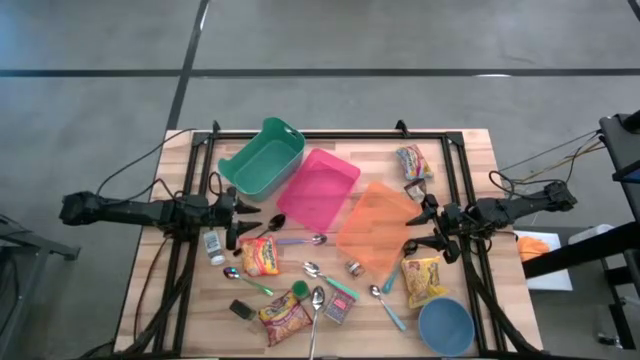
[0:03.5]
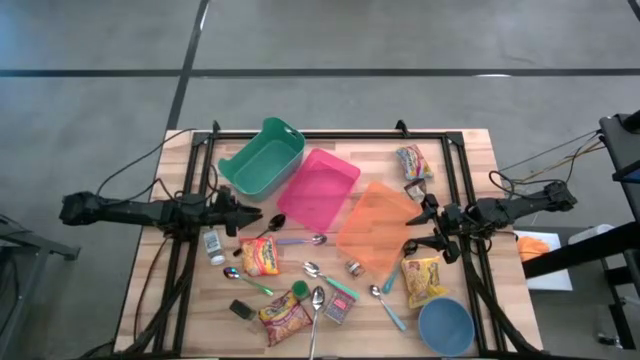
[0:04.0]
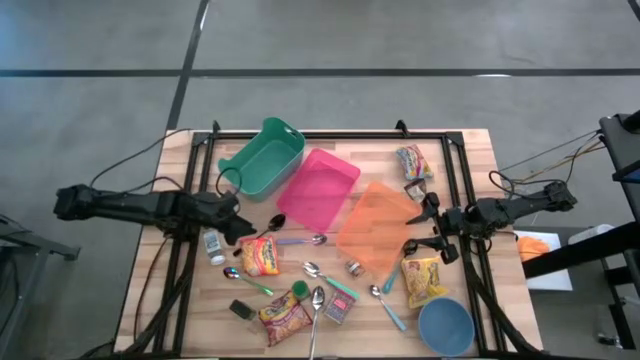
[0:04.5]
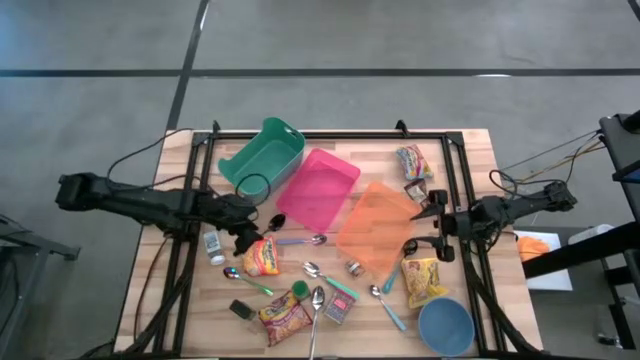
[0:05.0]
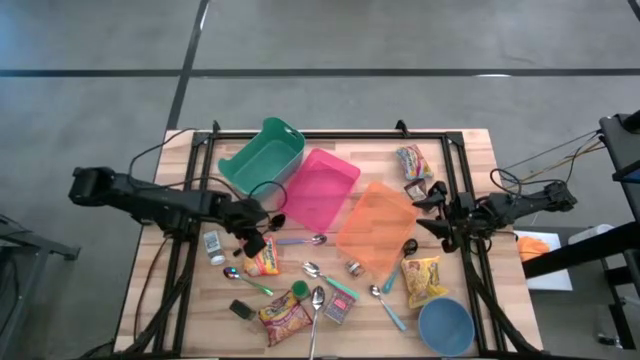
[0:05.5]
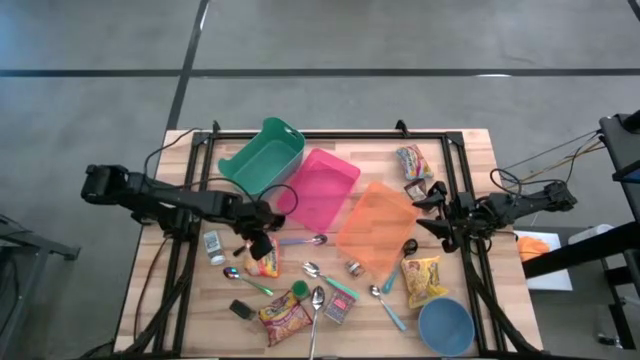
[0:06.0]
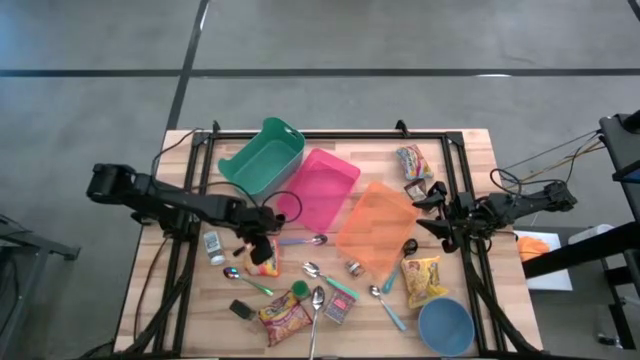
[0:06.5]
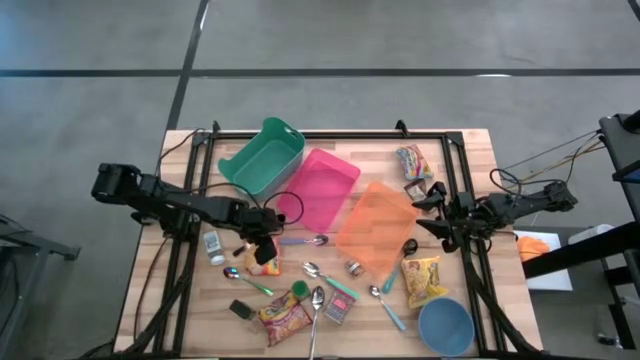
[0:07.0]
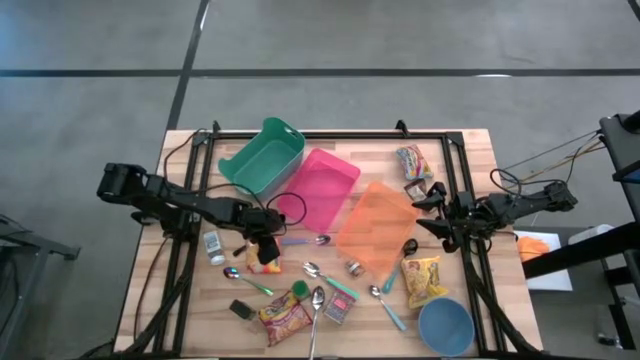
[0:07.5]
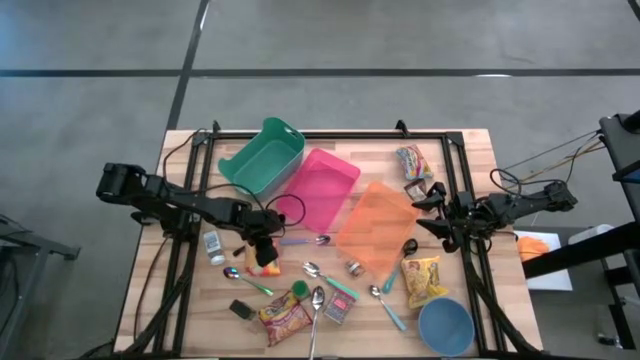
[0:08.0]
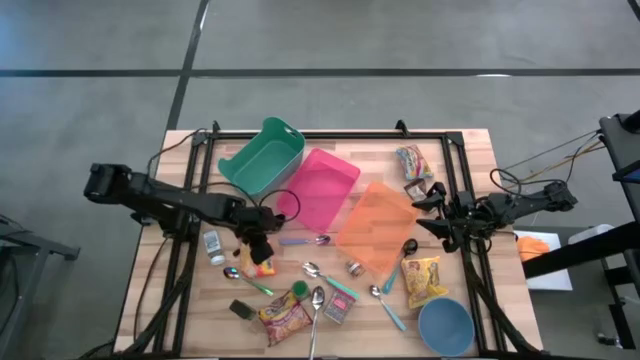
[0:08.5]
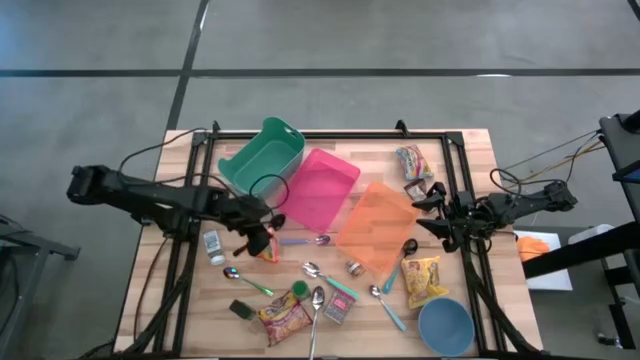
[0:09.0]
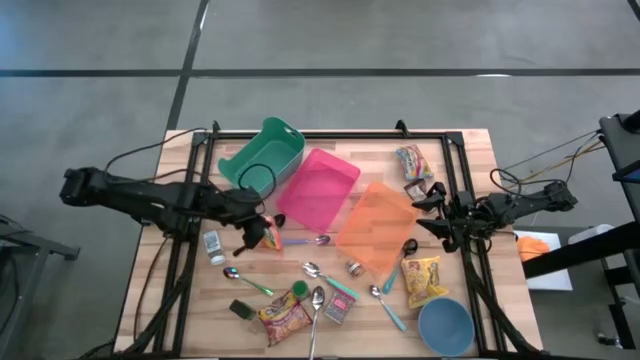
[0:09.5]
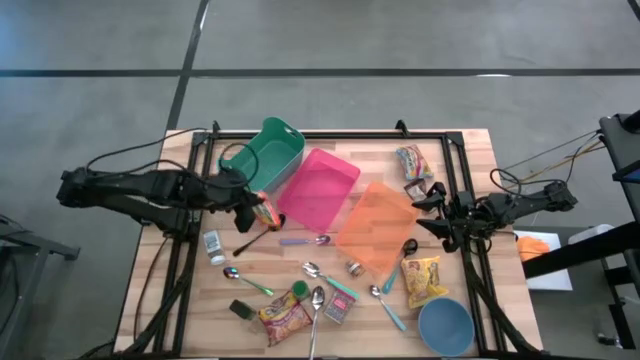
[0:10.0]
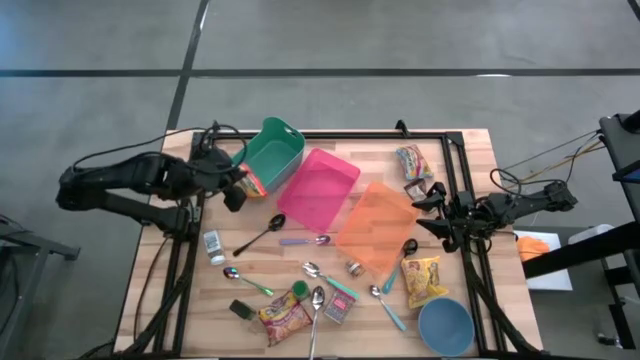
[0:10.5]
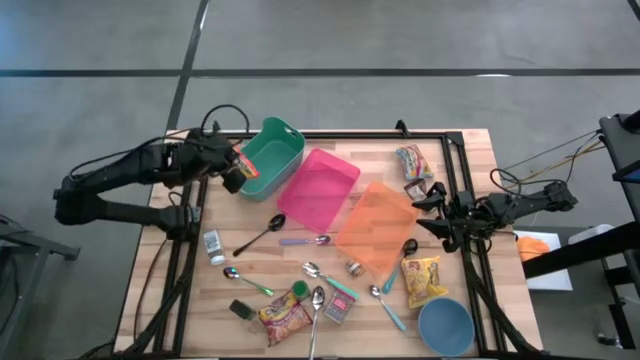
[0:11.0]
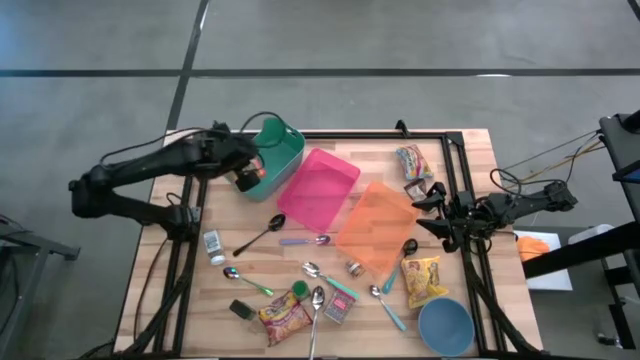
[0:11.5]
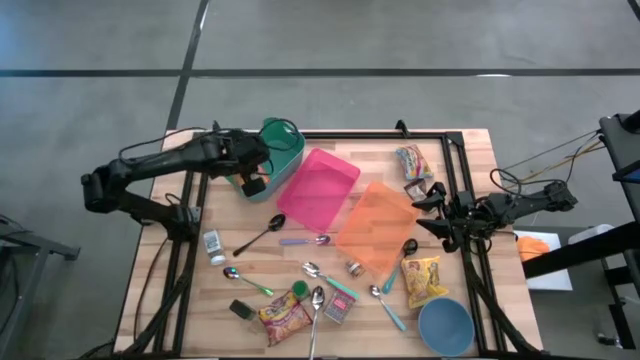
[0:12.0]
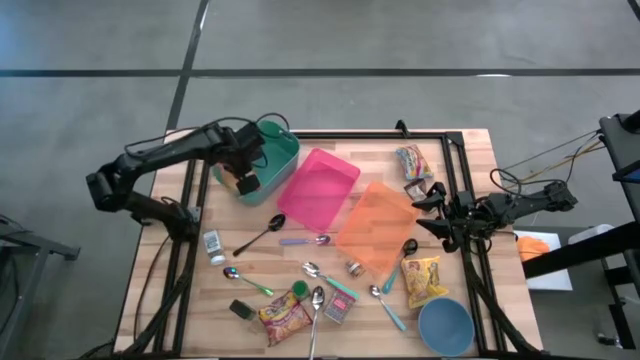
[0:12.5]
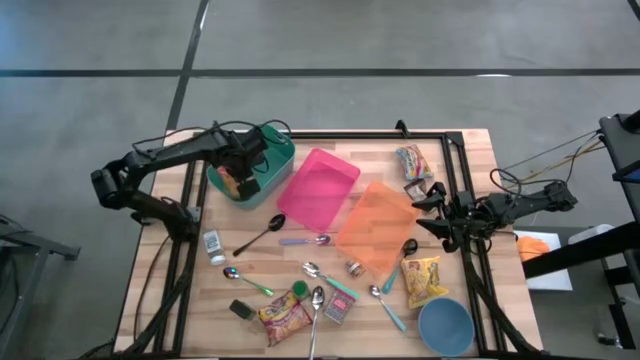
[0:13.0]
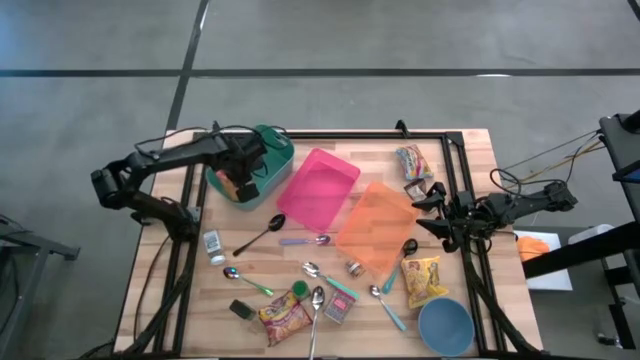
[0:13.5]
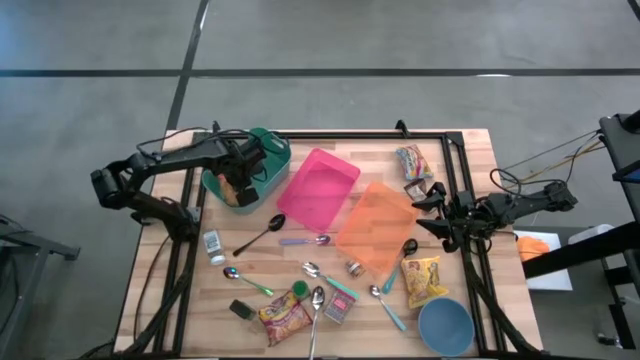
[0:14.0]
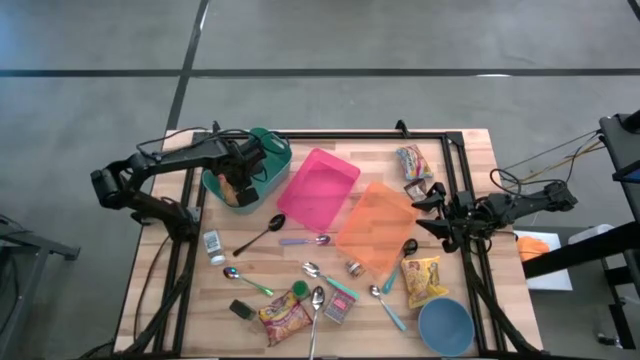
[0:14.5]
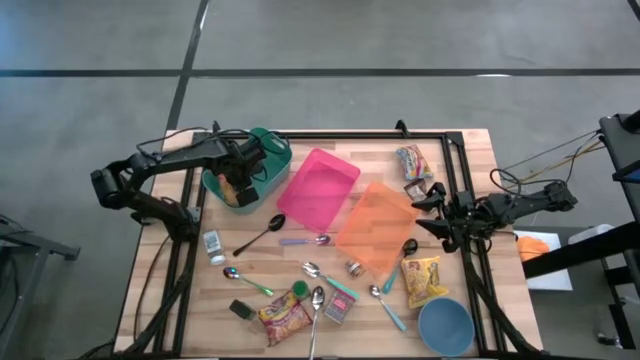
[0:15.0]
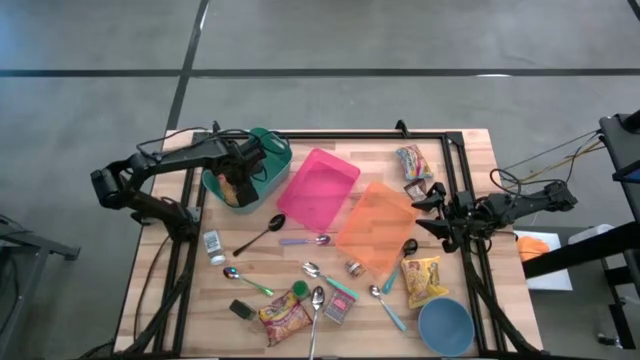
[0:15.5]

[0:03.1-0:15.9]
Put the orange noodle pack into the green bin

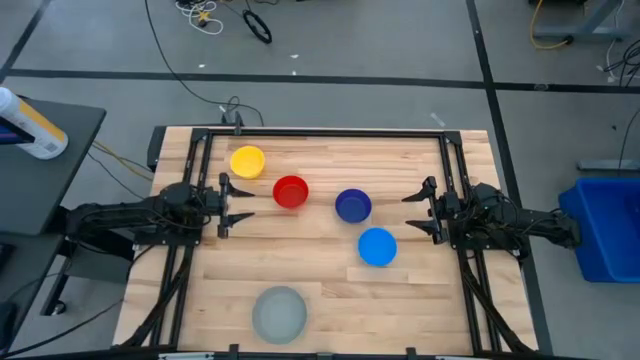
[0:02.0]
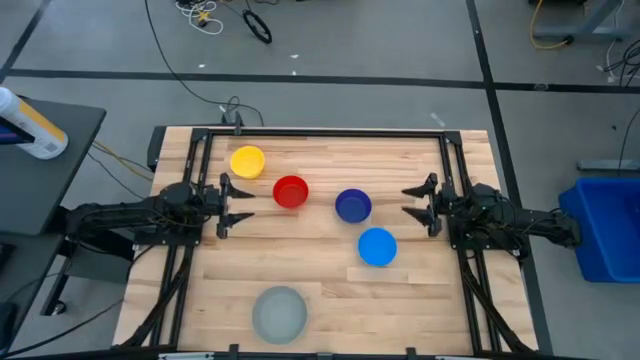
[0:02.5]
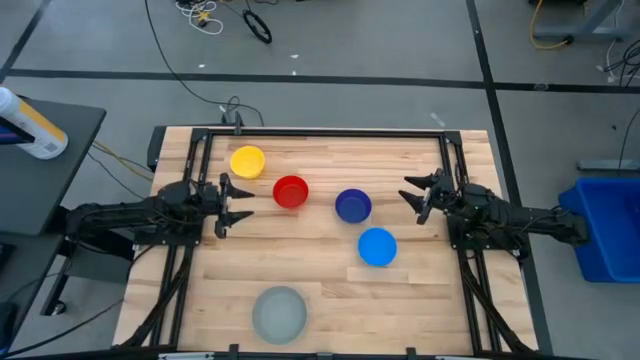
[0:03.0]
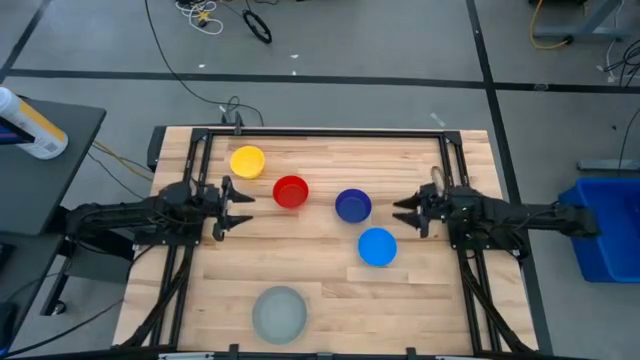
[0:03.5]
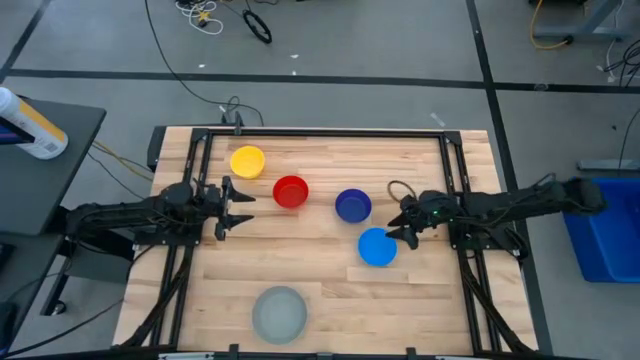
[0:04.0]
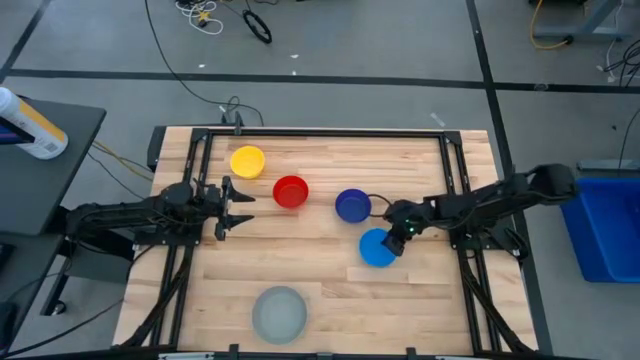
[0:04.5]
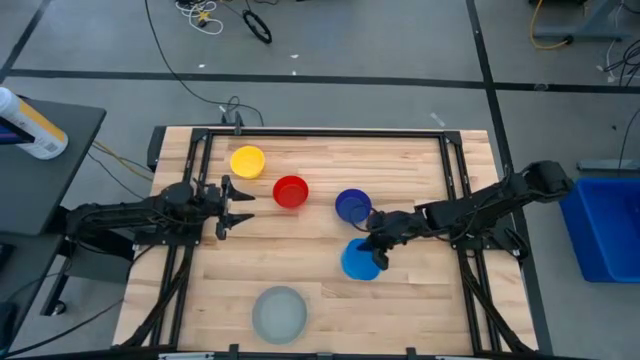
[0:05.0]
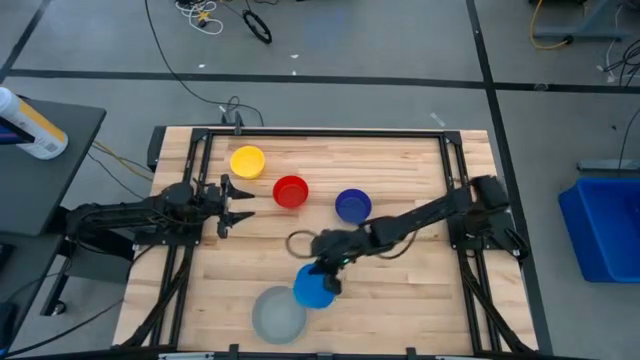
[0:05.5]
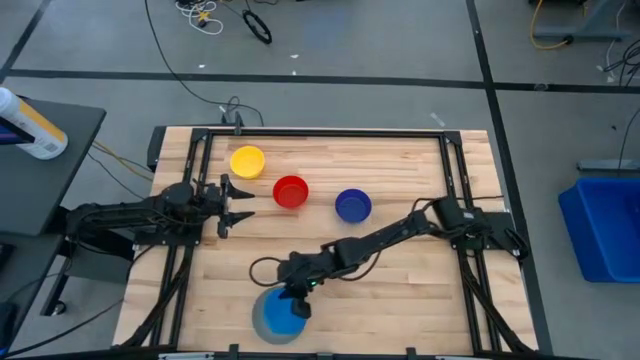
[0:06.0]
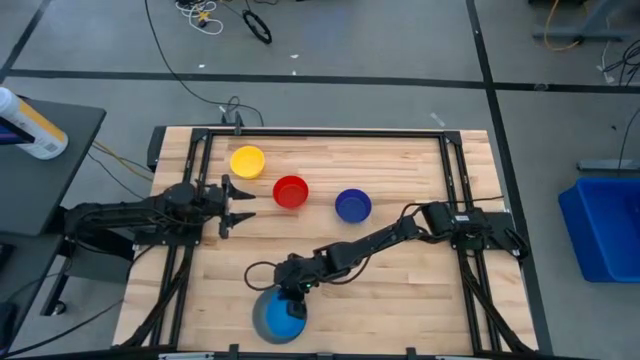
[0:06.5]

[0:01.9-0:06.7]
Stack the blue bowl on top of the gray bowl

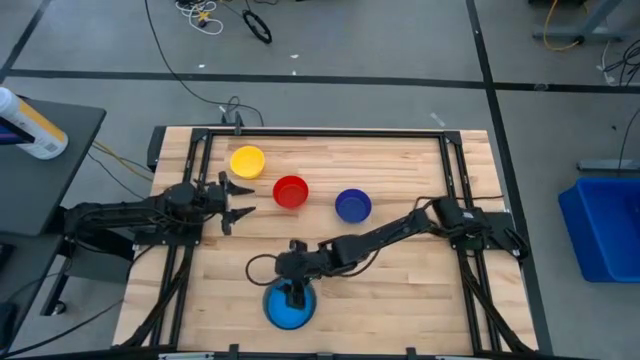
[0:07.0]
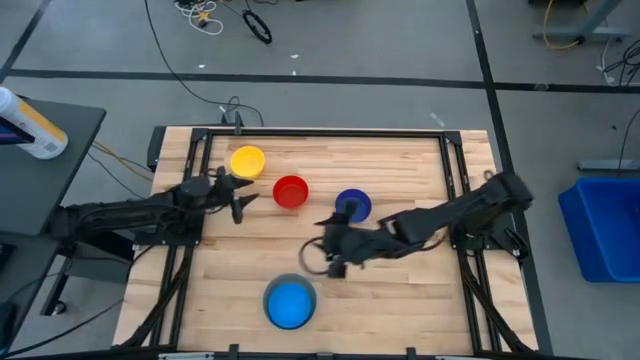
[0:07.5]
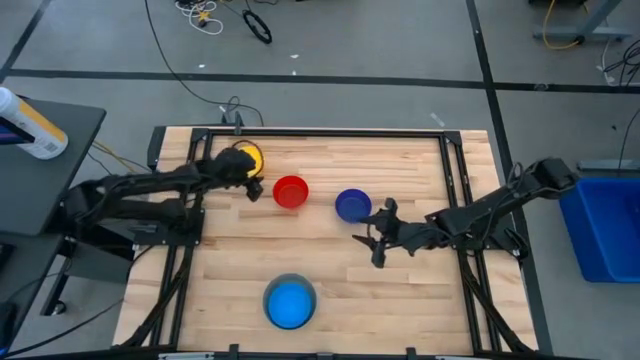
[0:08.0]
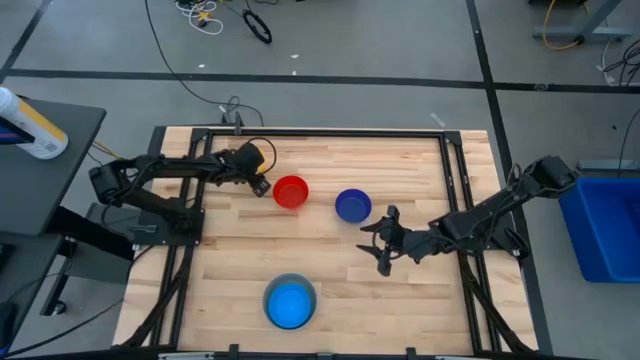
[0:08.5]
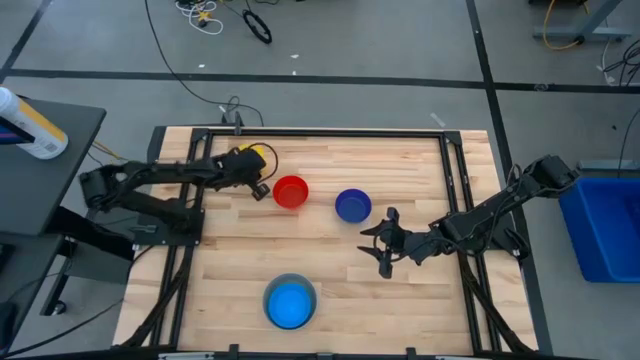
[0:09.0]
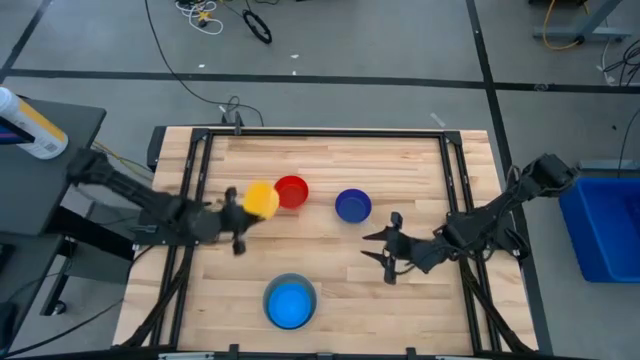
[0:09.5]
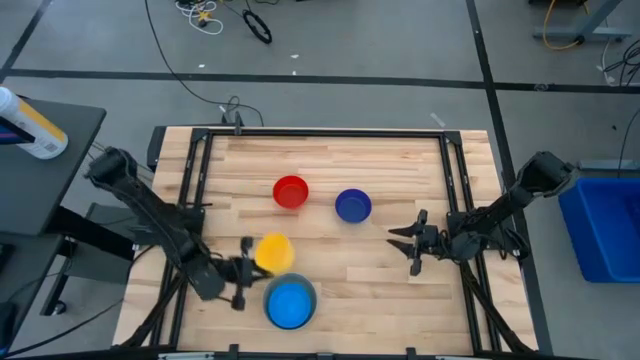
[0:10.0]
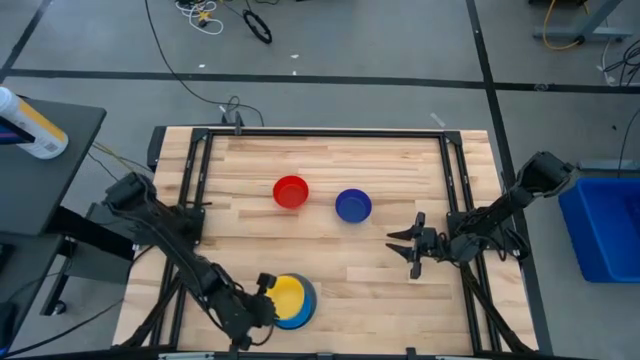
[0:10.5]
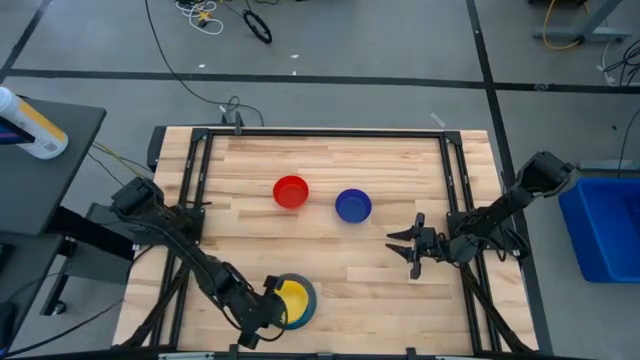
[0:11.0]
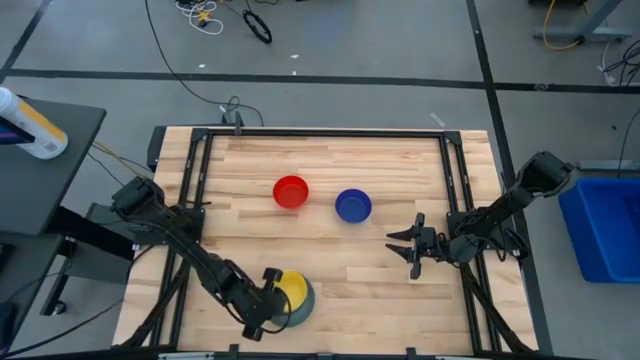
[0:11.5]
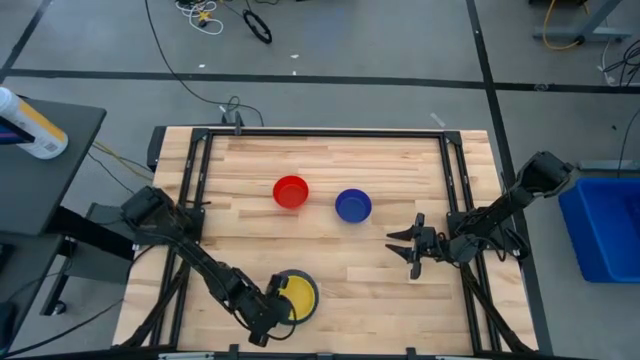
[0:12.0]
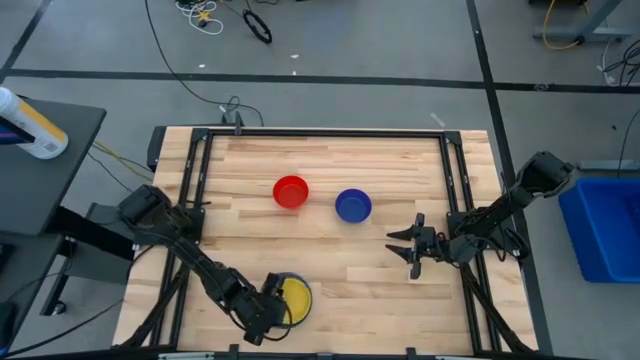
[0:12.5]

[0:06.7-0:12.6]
Stack the yellow bowl on top of the blue bowl
